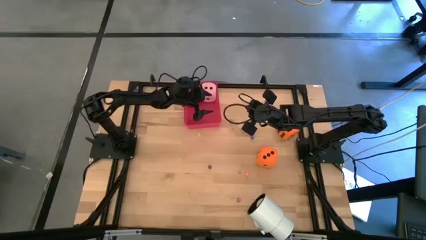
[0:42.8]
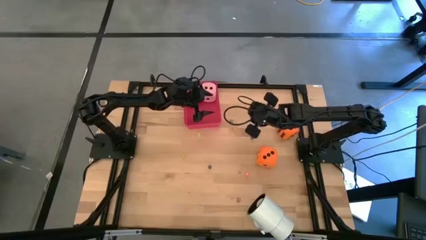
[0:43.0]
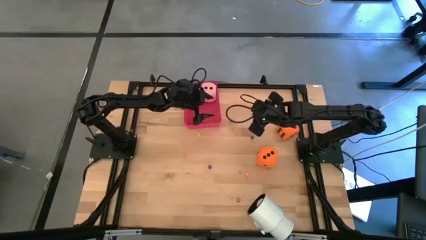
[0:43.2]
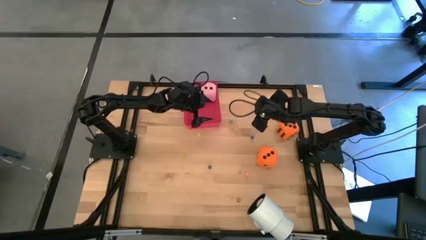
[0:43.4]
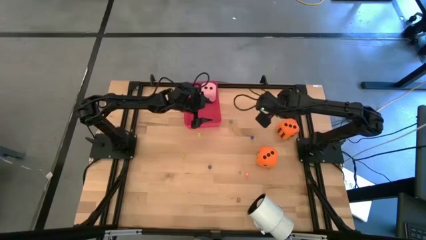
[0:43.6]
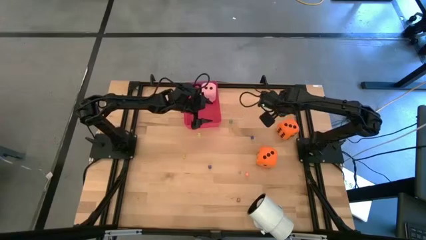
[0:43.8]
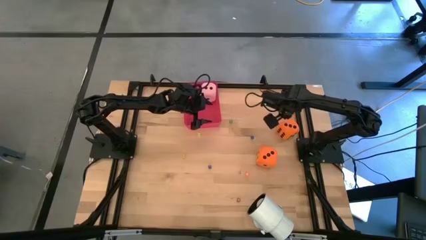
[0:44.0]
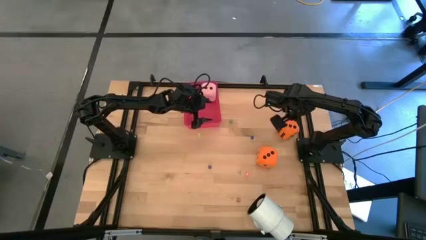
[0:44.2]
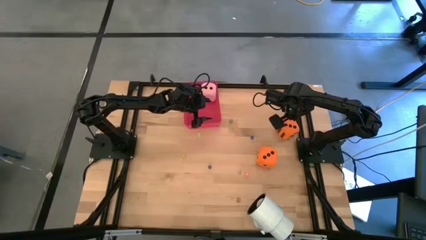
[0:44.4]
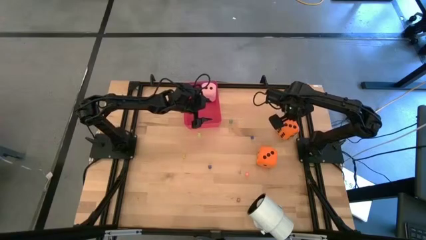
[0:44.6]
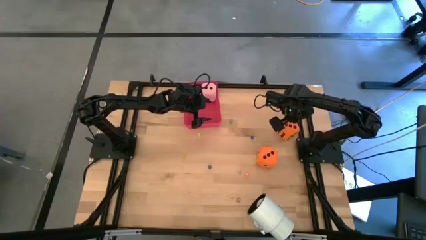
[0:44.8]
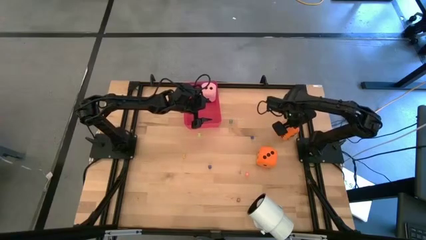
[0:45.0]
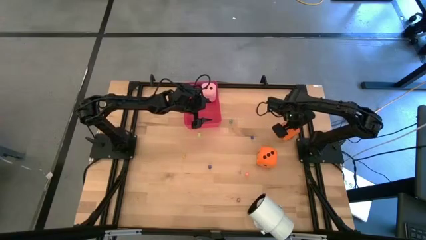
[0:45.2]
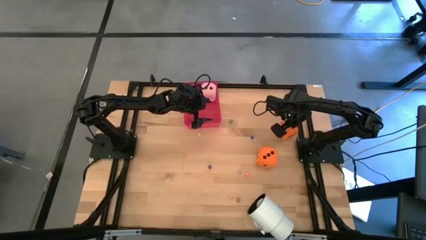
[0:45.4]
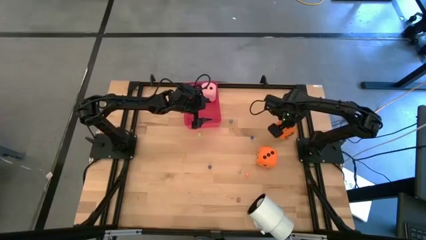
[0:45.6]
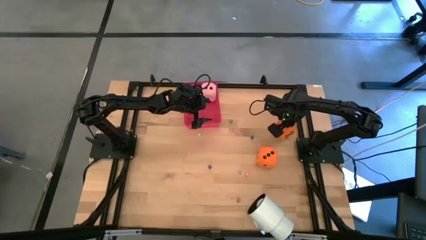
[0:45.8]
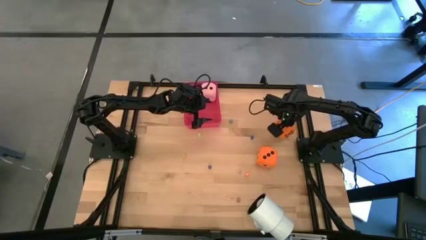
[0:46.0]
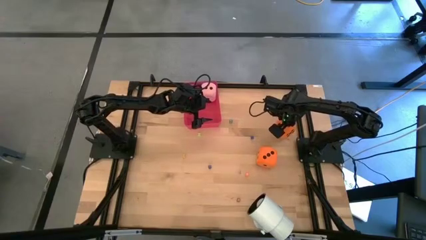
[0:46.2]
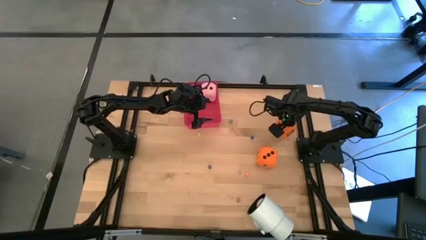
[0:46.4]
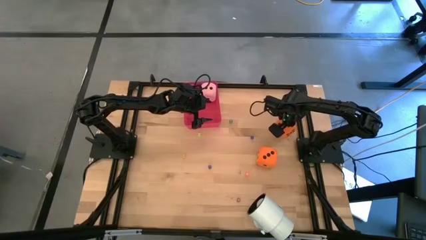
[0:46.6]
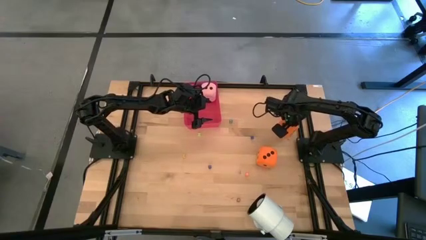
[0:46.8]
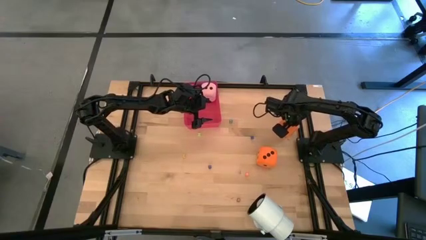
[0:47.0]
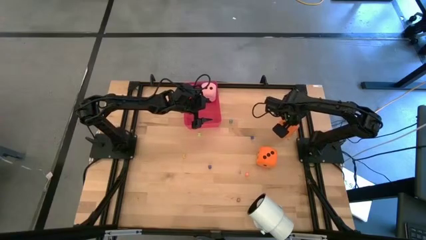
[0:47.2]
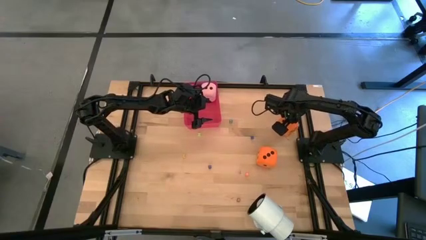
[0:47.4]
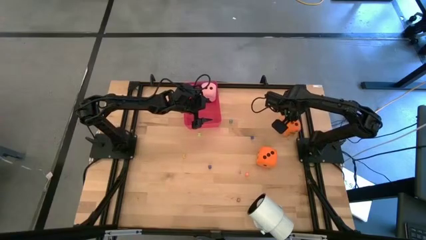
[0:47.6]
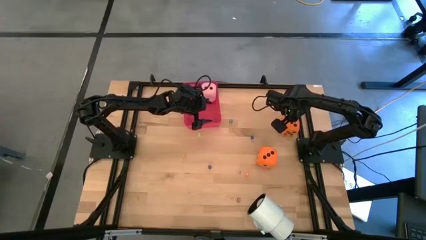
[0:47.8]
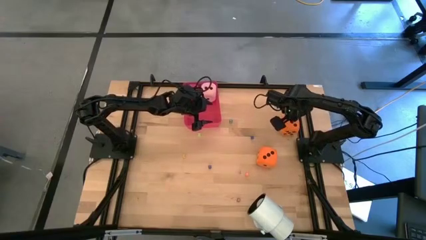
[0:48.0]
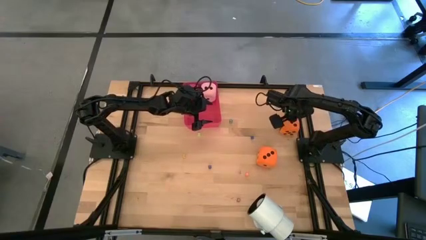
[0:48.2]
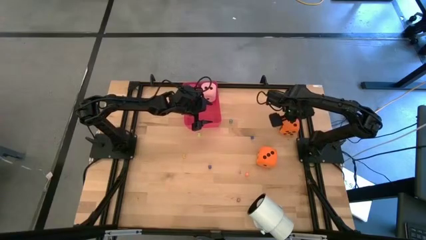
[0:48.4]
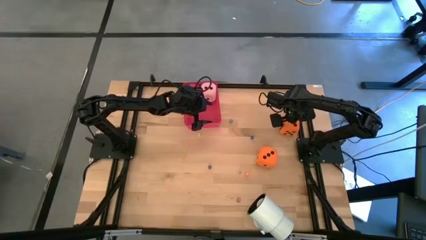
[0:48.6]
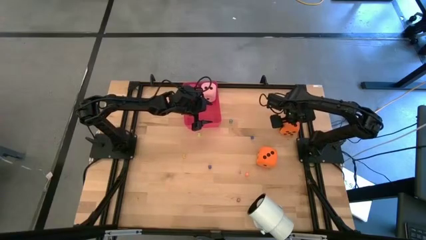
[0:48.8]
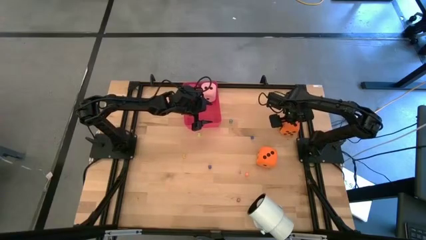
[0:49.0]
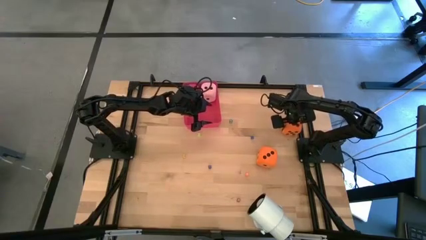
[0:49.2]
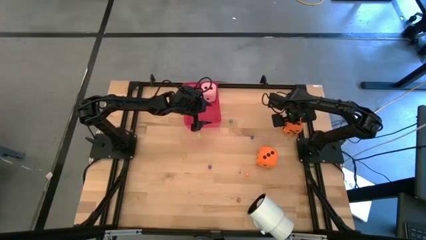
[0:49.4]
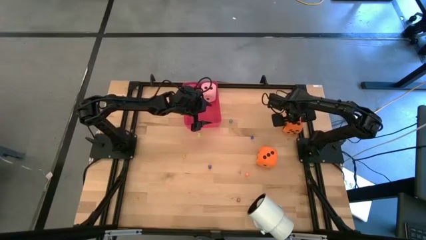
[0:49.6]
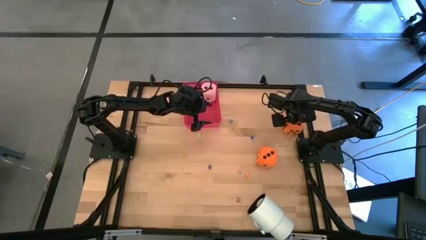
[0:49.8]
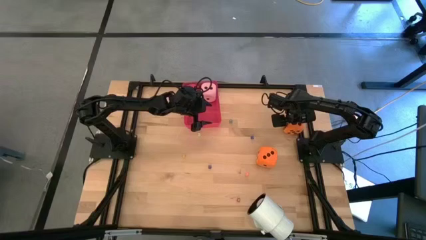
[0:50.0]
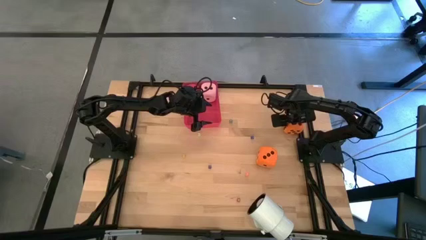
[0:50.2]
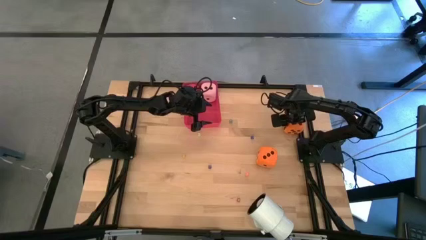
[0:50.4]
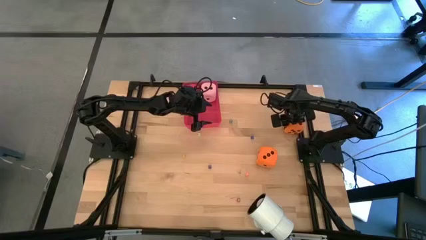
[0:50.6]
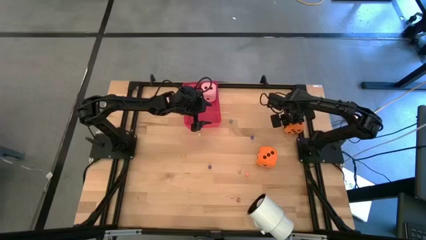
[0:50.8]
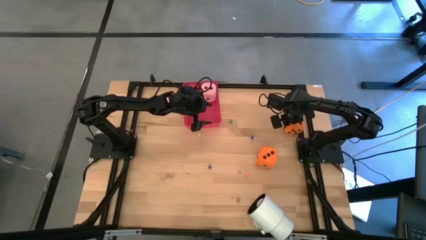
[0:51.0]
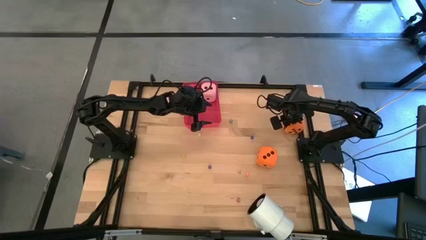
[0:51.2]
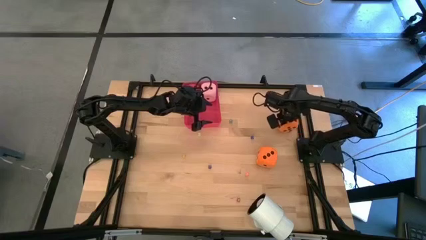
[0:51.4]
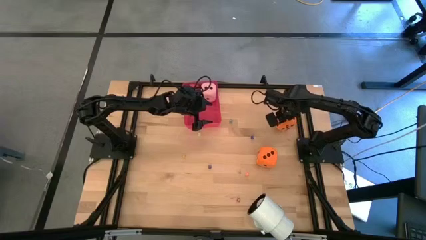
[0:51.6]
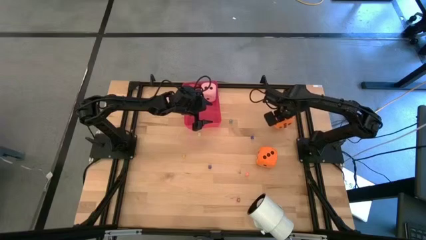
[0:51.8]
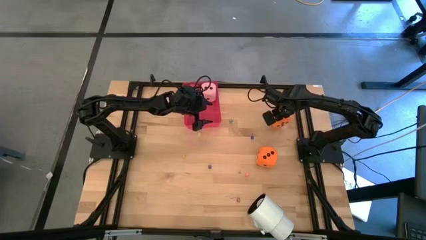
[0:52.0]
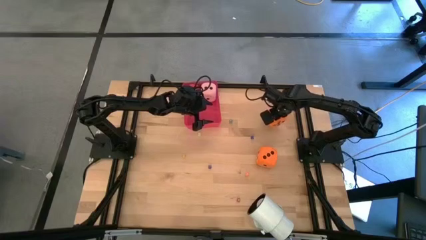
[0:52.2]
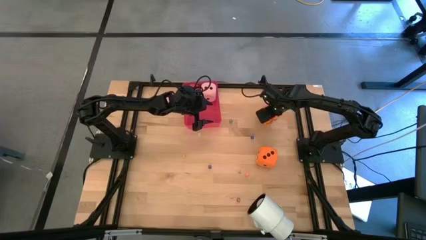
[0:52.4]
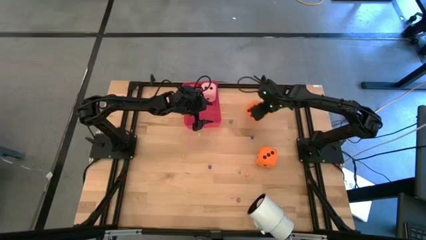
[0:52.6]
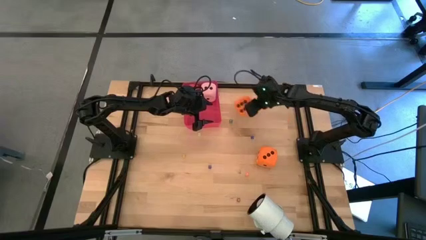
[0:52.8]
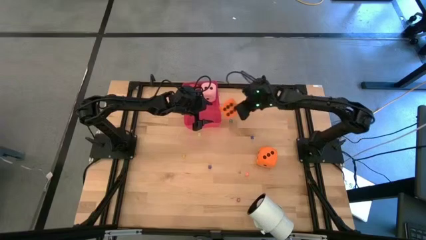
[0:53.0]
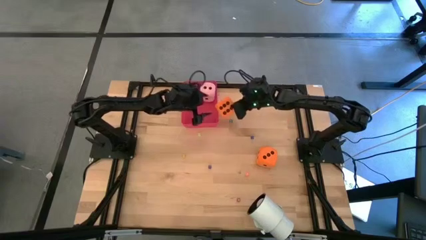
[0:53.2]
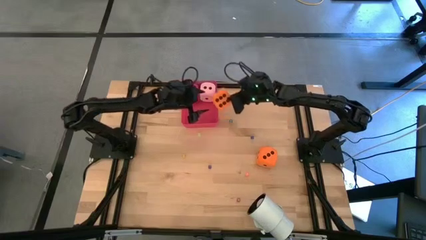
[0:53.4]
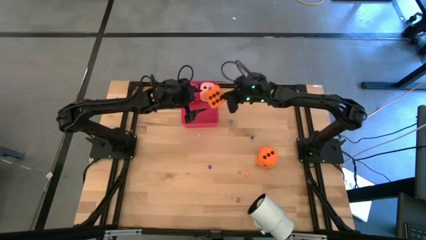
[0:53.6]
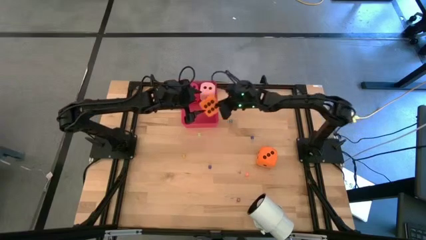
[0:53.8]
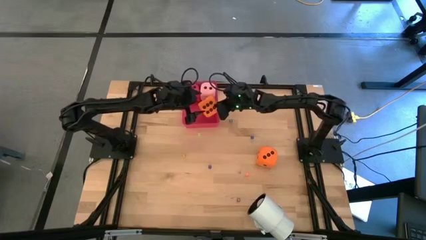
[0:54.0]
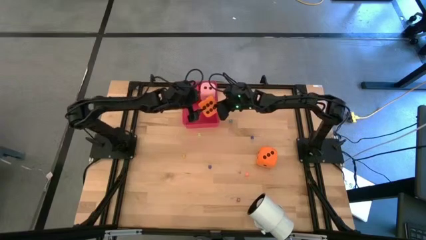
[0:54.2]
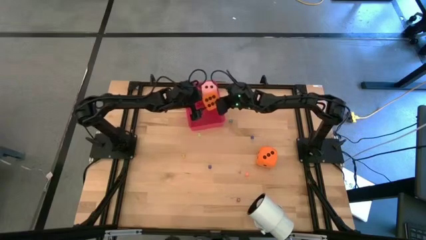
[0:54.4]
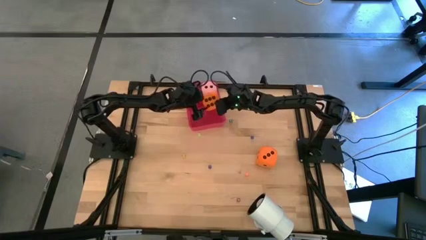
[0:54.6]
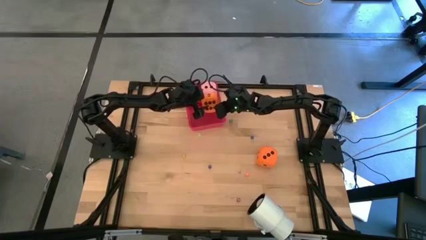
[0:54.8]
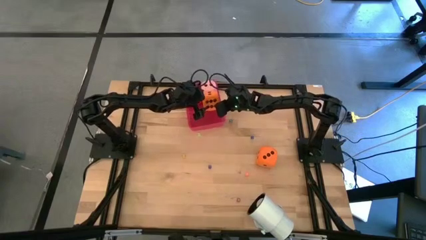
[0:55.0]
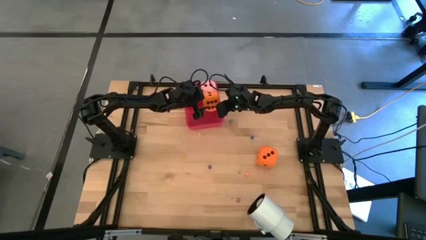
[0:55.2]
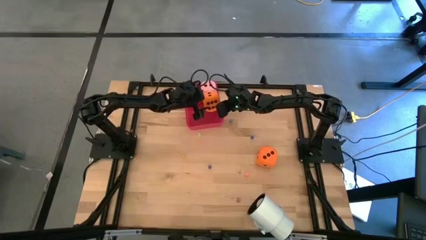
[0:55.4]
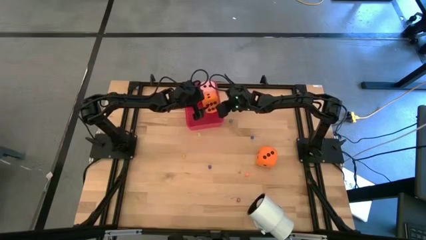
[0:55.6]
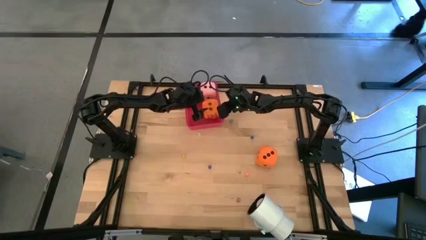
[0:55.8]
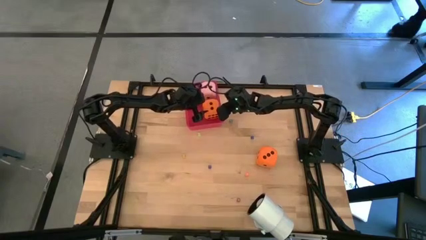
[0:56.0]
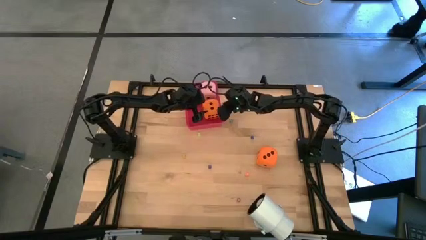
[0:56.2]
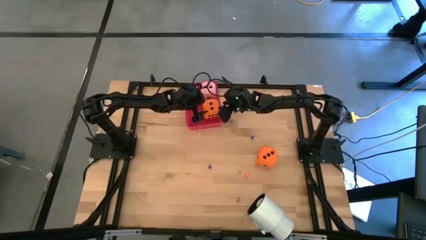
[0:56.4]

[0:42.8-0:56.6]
Task: Pick & Place Dice
Put the top right big orange dice into the red bin
